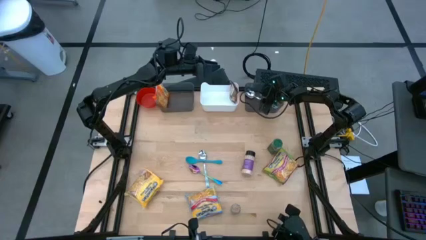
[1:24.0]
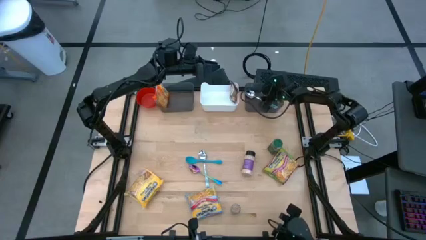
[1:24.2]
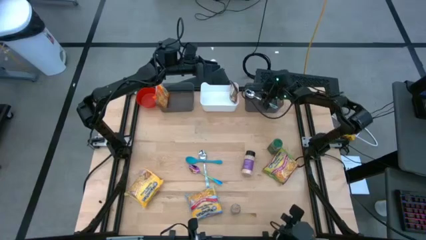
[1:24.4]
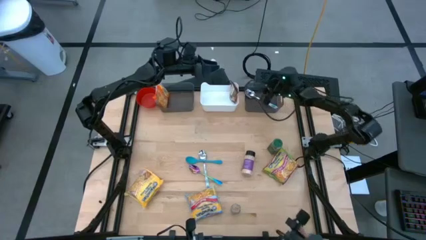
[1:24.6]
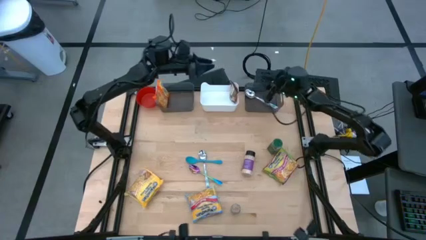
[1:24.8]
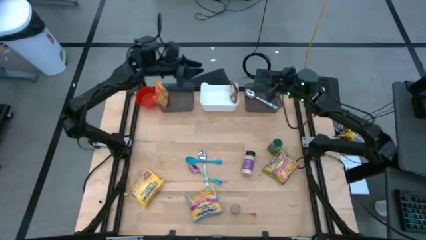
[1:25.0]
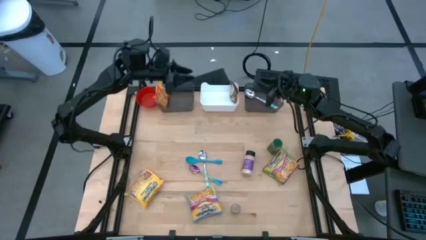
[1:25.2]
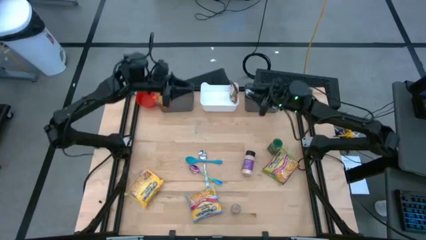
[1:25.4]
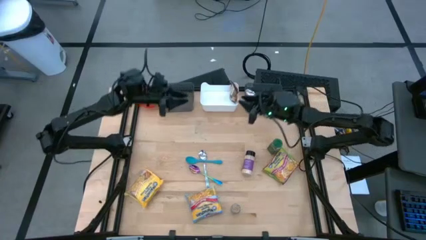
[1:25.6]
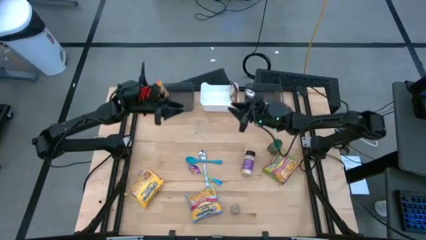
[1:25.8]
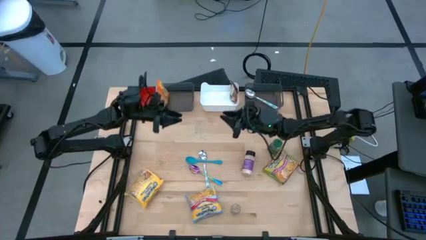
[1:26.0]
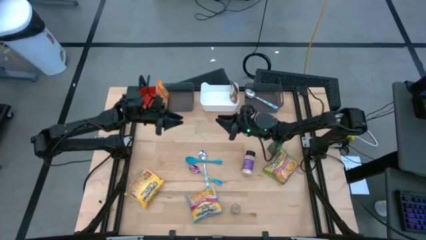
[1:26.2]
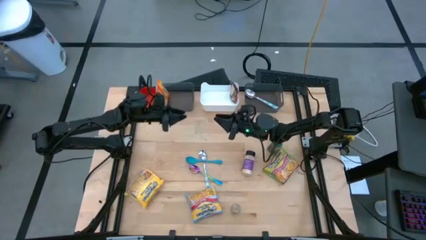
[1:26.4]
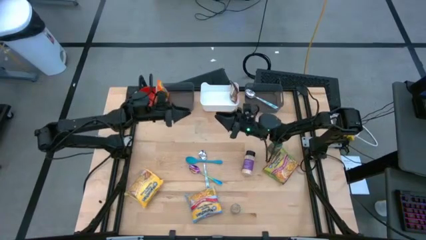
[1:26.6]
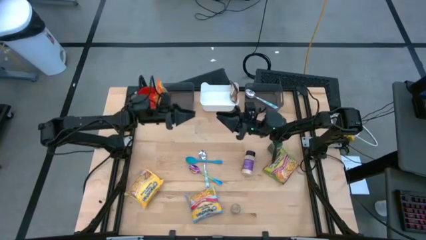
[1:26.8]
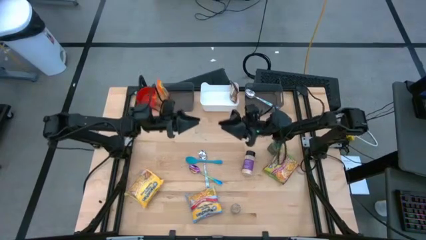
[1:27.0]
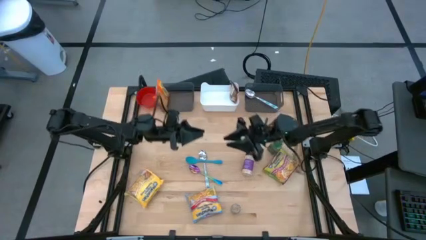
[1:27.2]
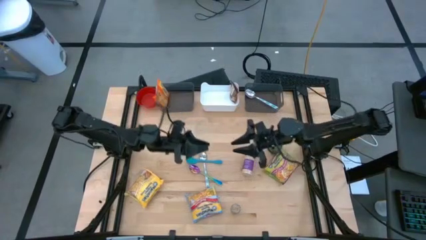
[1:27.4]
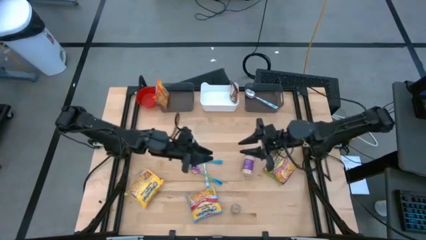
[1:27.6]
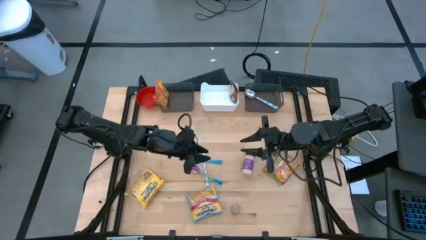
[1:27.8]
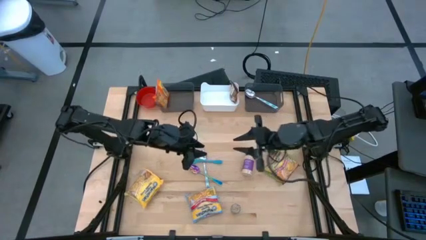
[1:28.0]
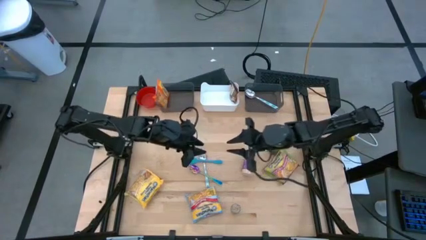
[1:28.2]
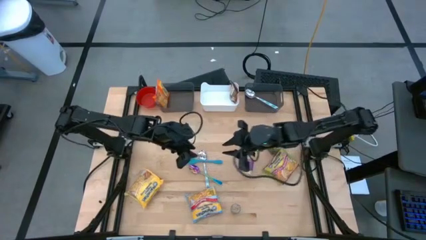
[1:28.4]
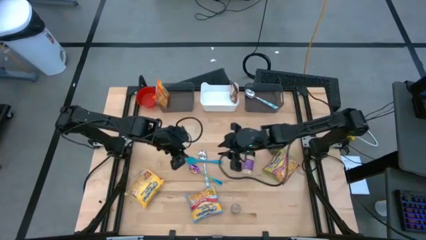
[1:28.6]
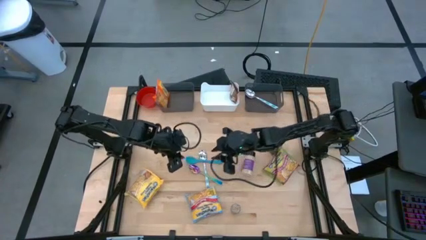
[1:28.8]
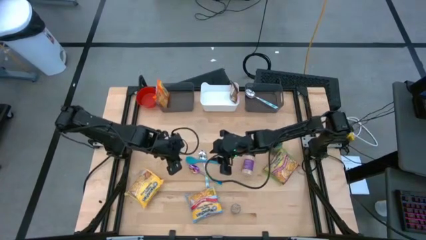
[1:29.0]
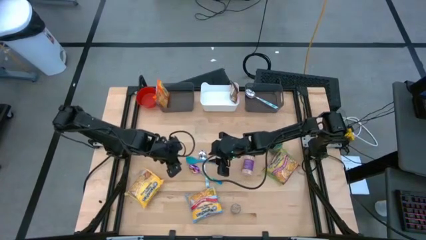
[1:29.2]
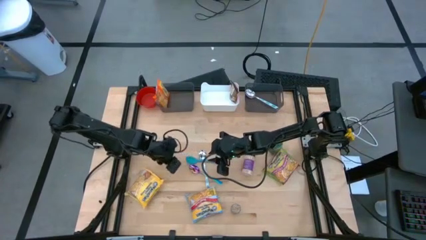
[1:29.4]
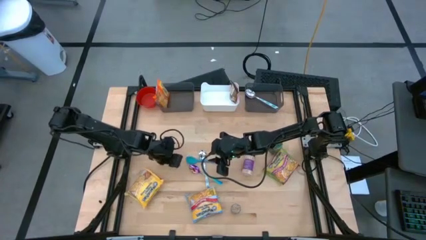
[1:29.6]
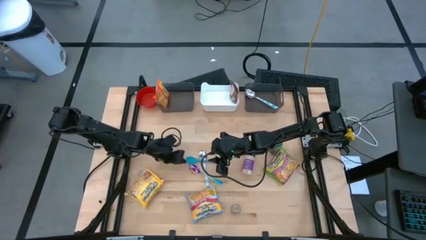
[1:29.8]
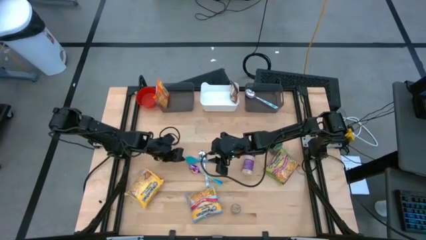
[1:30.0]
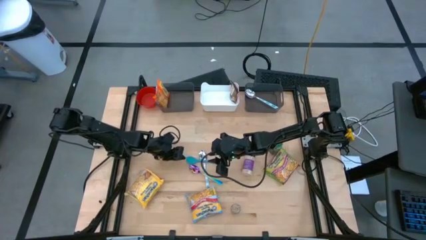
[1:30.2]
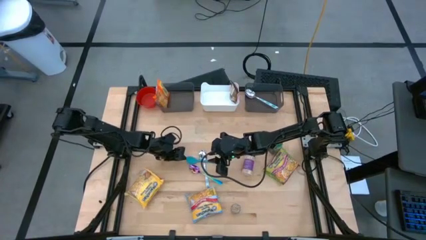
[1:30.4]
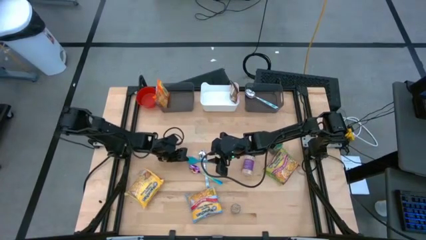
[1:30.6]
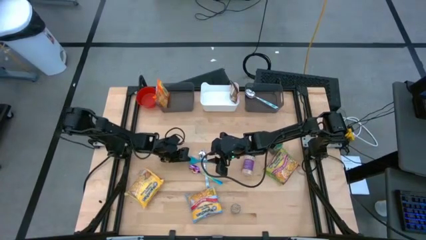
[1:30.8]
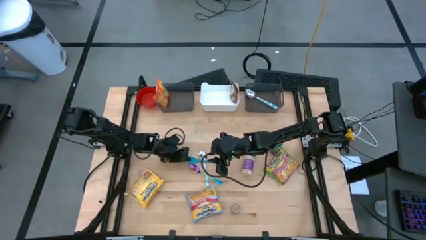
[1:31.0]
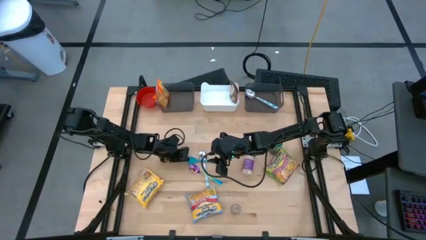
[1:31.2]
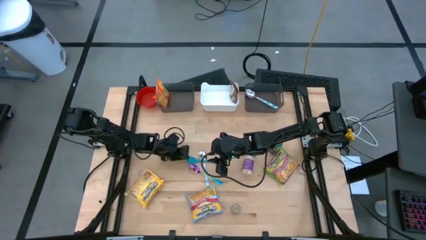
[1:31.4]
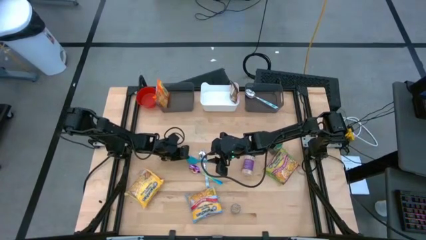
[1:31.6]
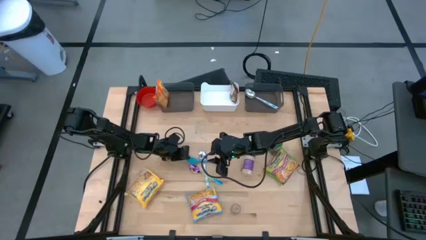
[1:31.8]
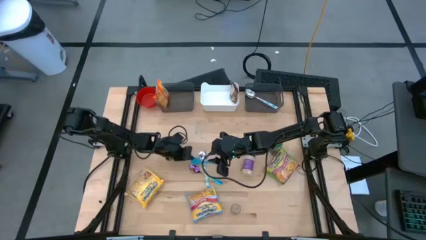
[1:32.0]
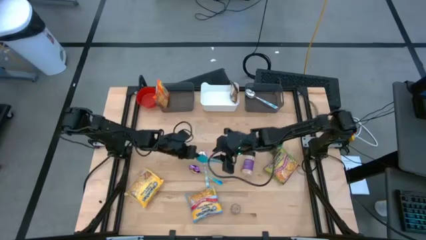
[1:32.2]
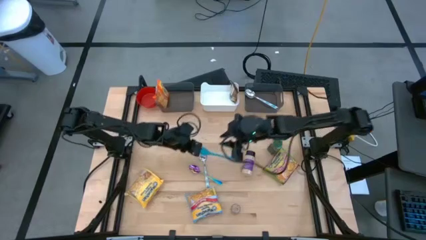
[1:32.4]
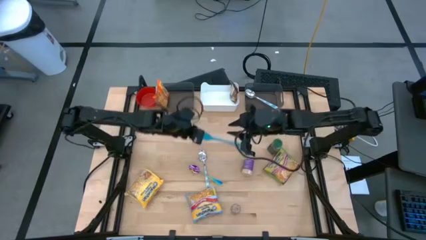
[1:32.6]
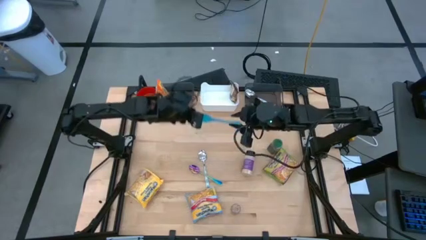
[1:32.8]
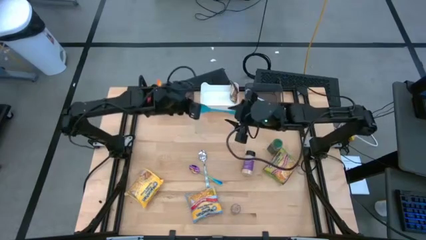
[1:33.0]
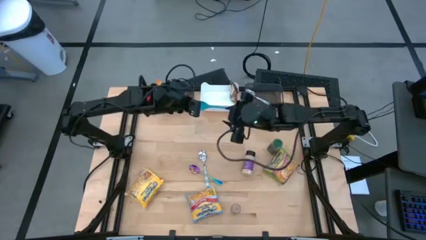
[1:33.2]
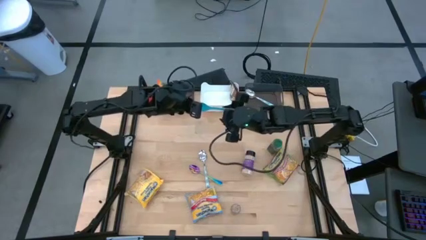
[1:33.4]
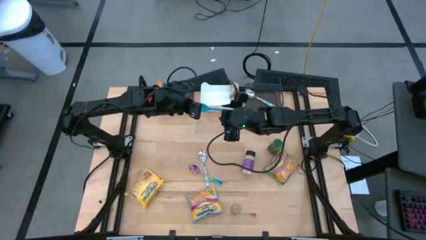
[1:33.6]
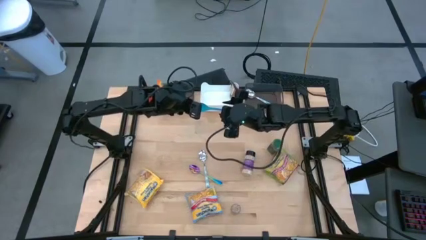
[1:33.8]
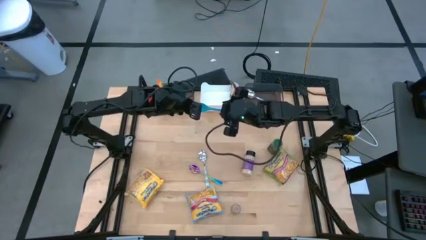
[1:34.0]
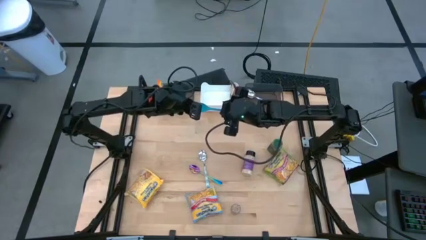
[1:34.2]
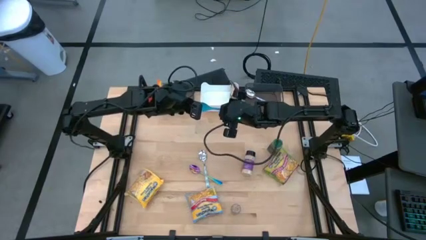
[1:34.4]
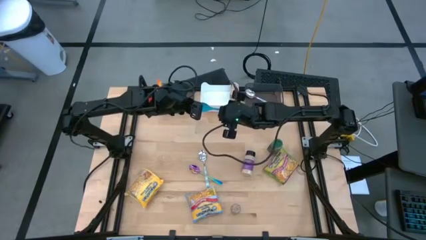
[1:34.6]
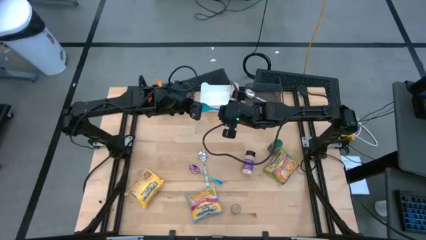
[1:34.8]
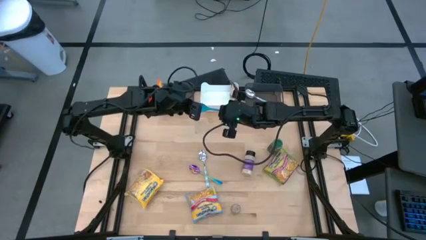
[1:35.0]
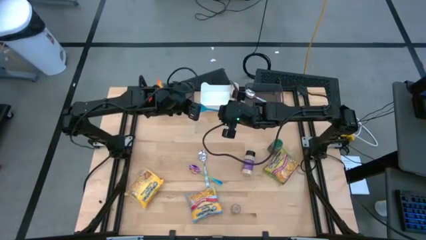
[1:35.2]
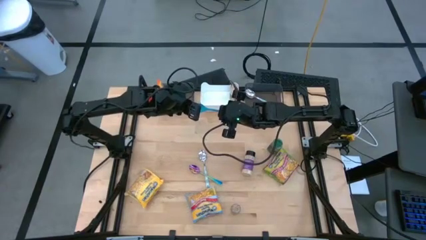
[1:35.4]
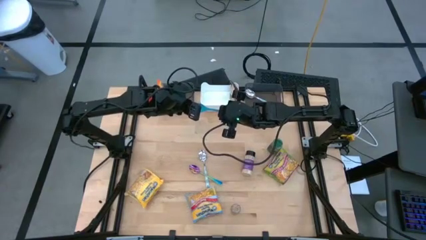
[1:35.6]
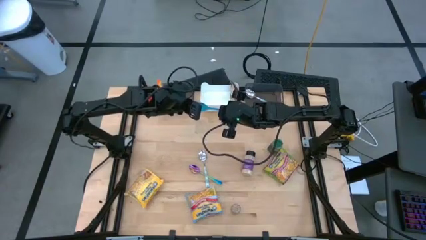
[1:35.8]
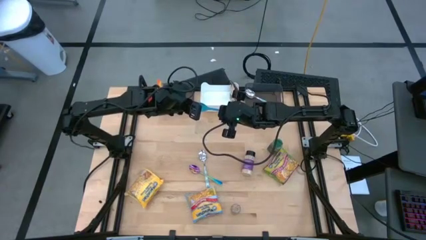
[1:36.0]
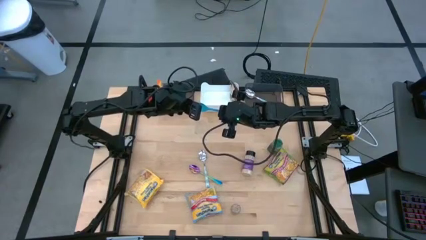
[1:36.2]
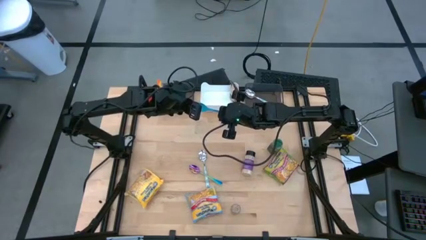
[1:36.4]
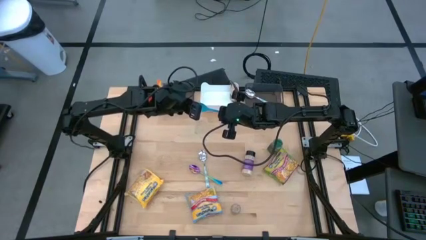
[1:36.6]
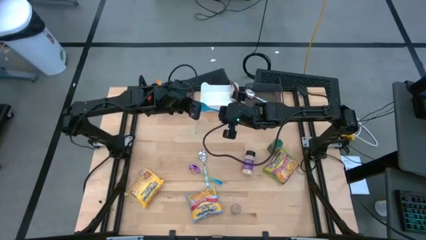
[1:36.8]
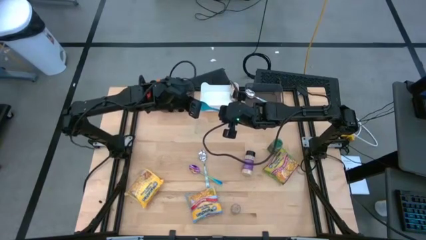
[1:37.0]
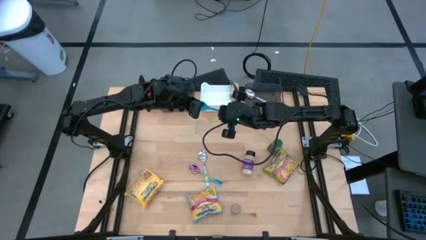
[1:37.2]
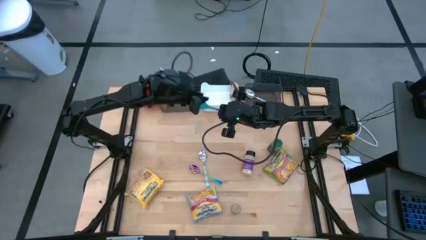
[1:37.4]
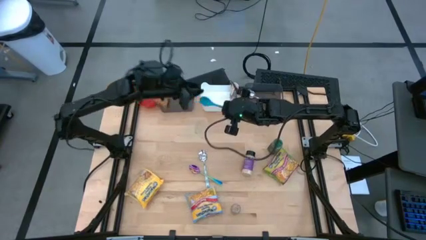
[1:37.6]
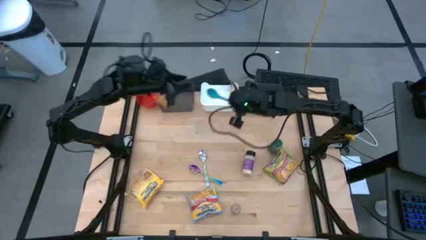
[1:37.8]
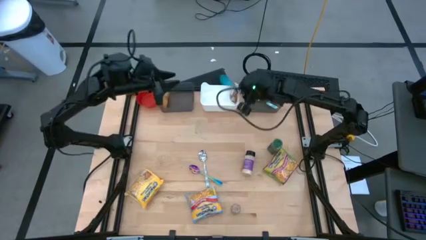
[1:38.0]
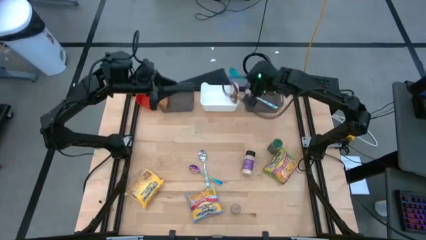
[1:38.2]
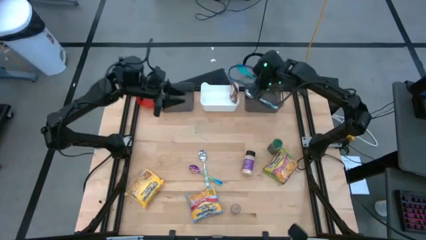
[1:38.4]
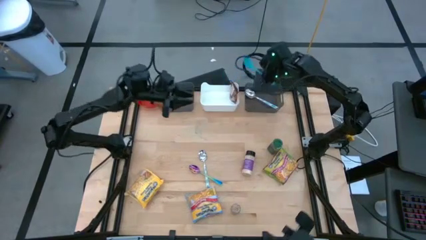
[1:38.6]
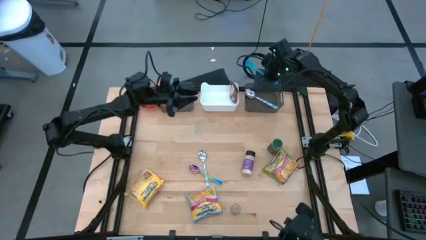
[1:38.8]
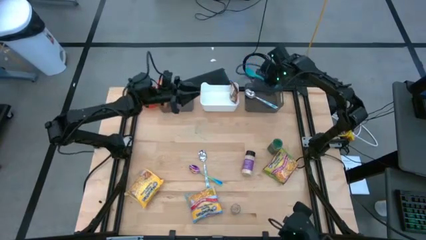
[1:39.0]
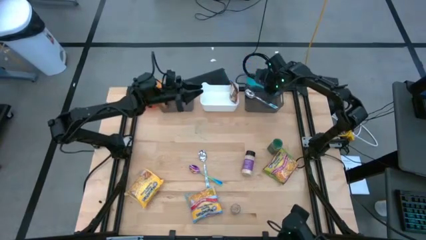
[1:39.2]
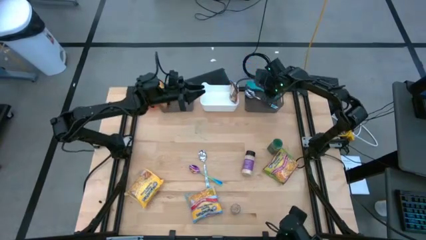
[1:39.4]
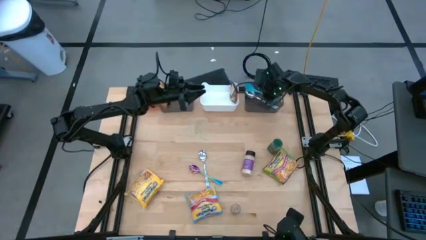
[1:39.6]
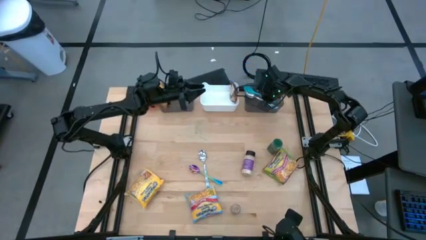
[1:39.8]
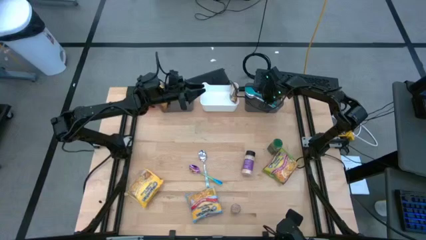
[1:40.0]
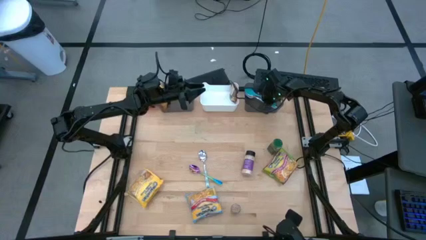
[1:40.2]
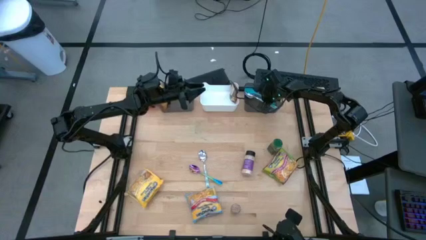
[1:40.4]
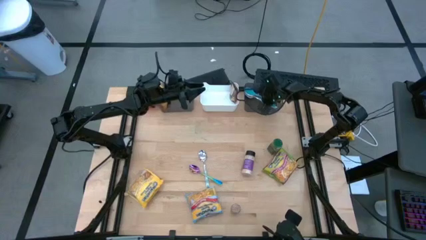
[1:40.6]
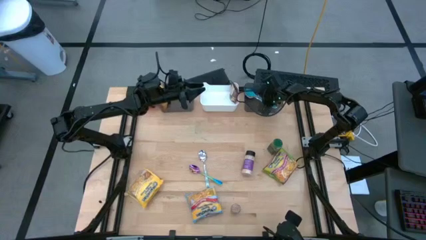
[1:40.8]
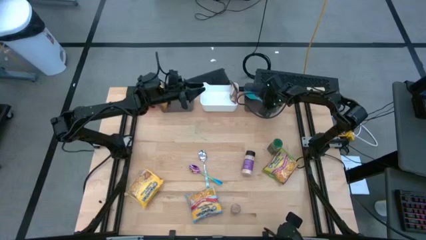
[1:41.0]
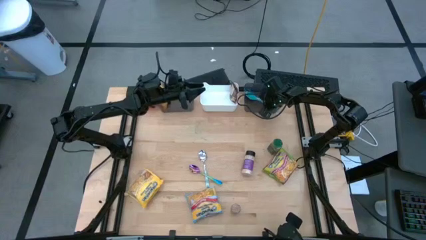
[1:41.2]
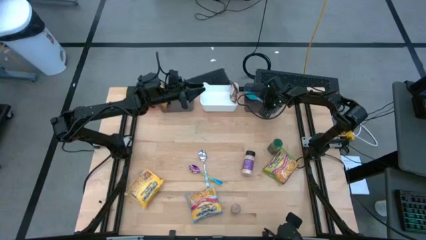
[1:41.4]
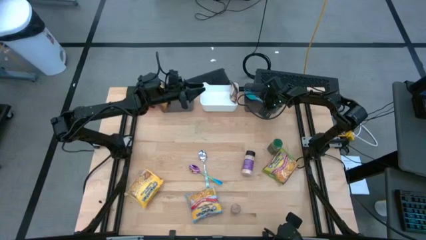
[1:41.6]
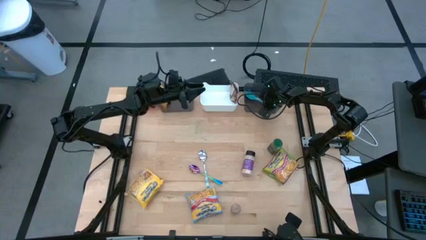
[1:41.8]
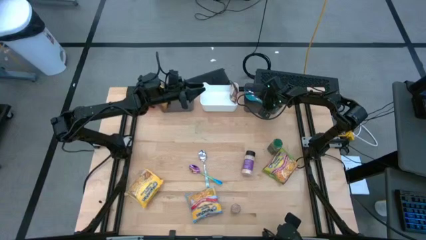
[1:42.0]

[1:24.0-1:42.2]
Task: Pick & Place Food Item
Put the blue baby spoon into the right black bin
